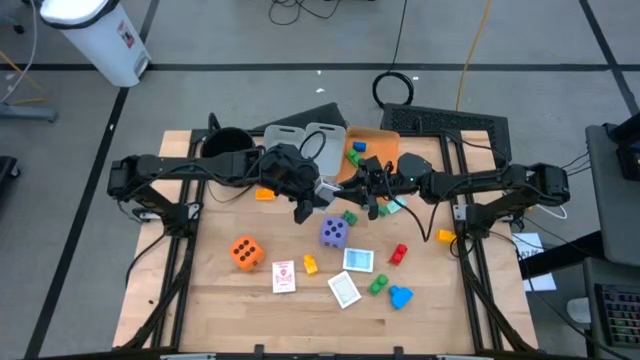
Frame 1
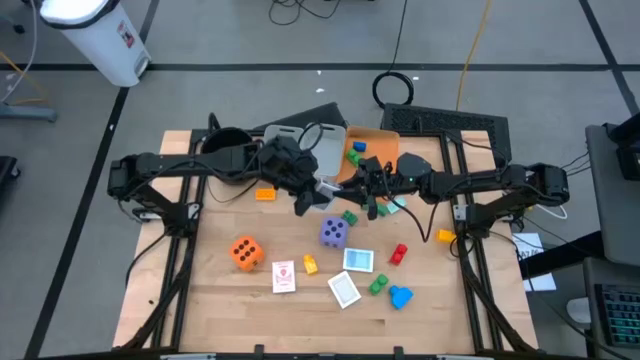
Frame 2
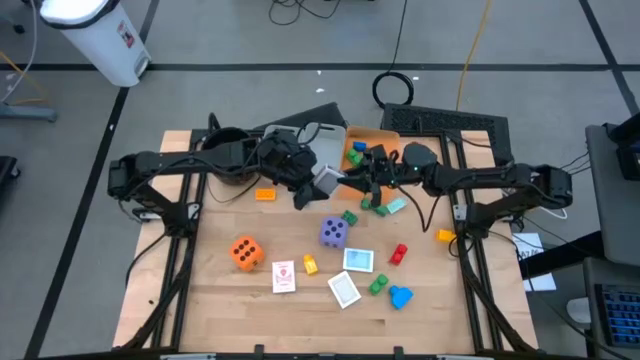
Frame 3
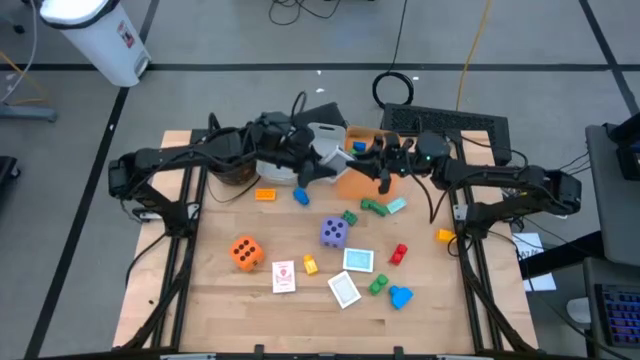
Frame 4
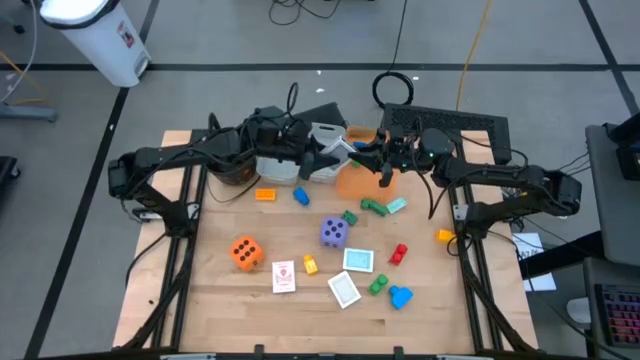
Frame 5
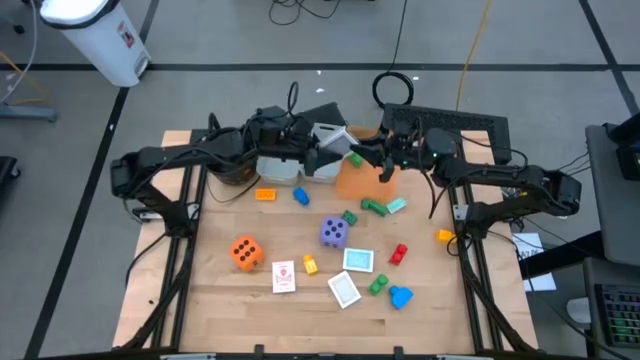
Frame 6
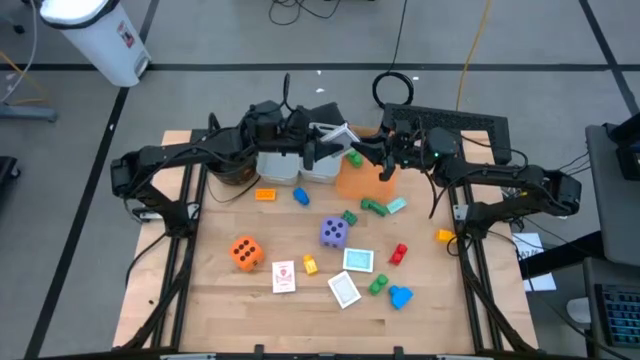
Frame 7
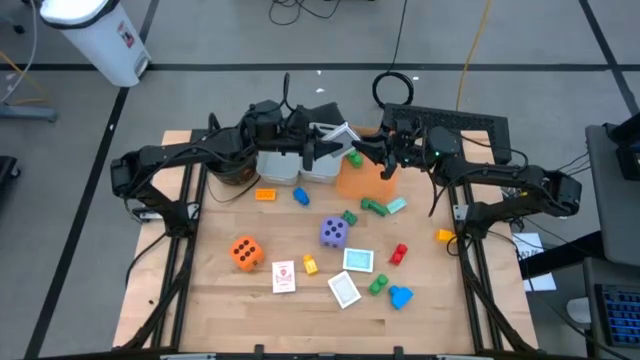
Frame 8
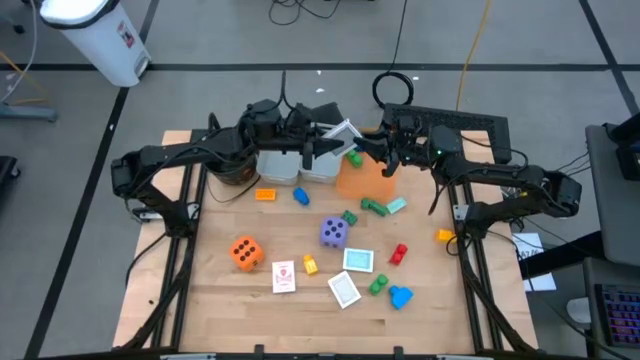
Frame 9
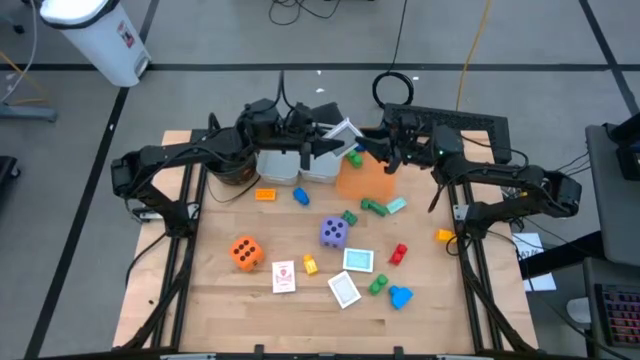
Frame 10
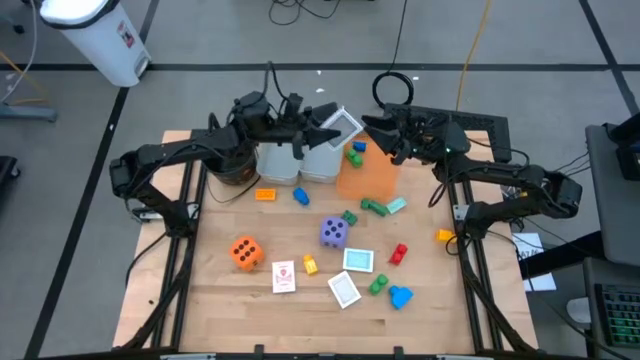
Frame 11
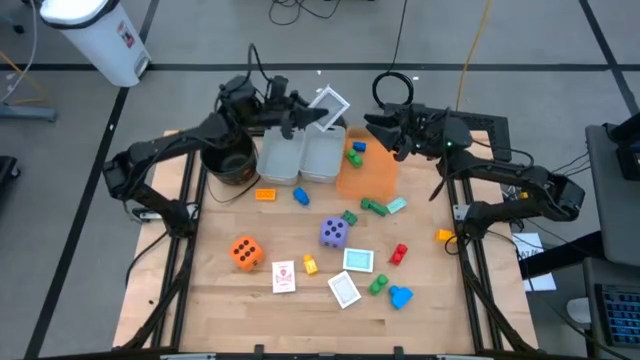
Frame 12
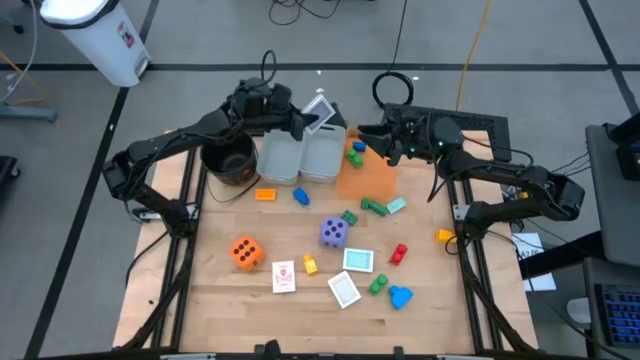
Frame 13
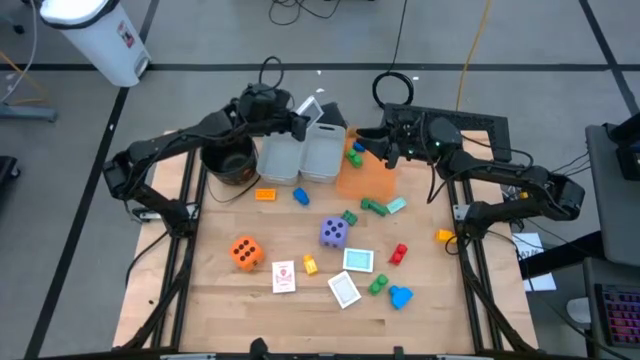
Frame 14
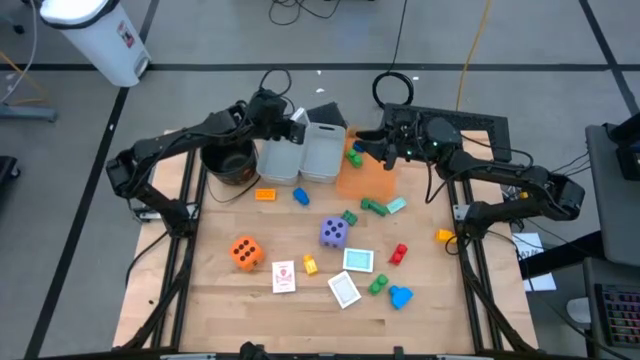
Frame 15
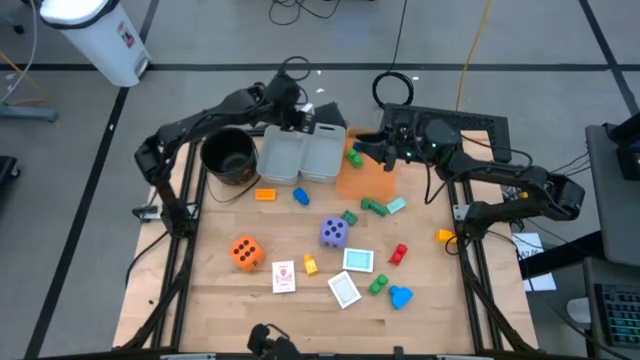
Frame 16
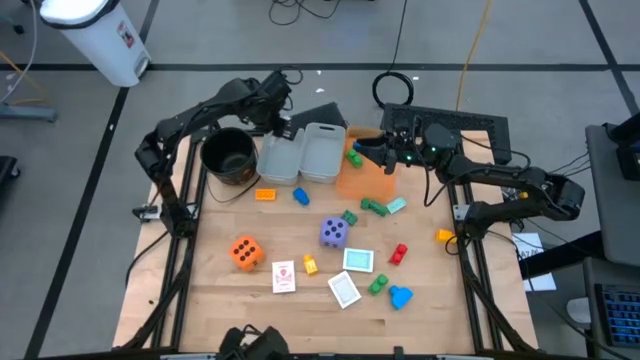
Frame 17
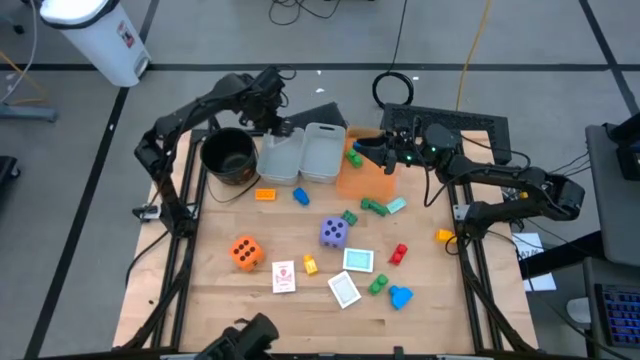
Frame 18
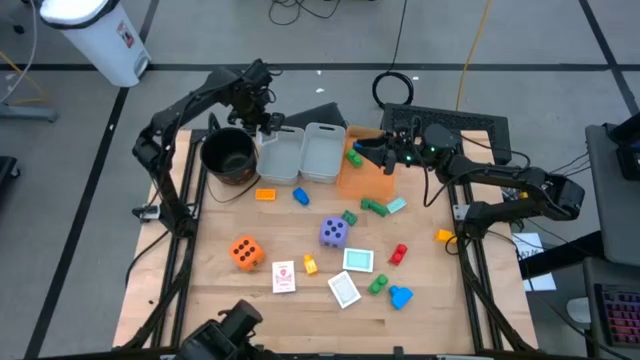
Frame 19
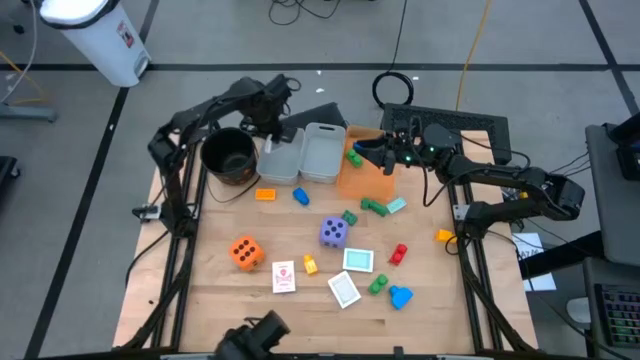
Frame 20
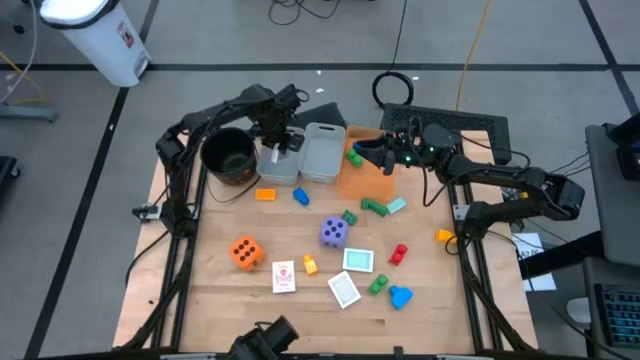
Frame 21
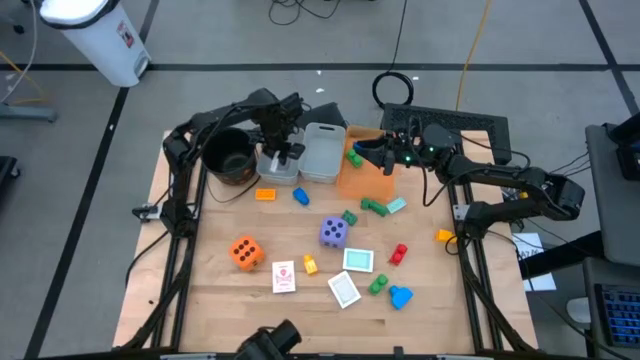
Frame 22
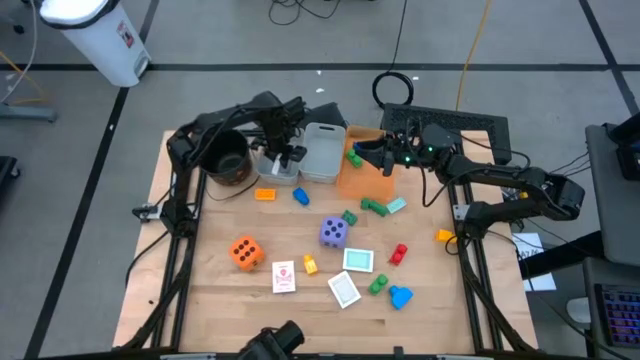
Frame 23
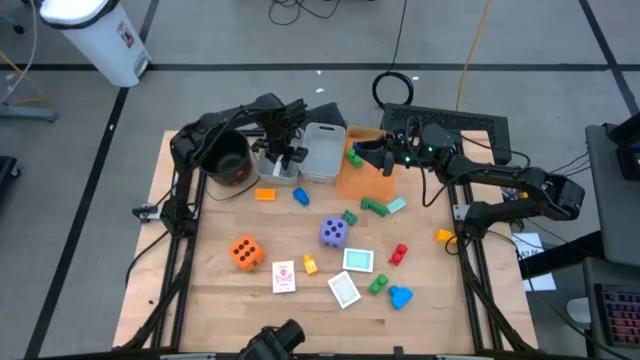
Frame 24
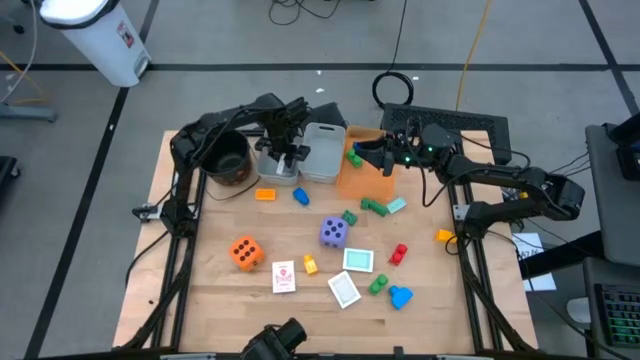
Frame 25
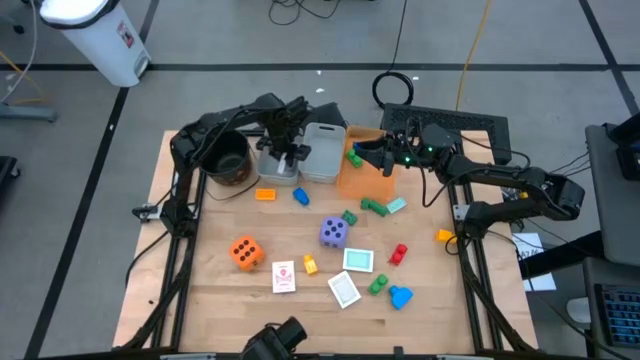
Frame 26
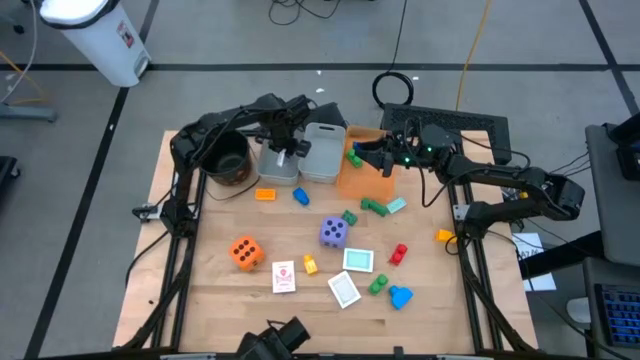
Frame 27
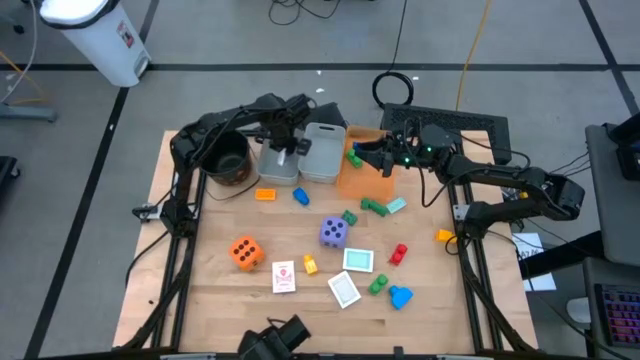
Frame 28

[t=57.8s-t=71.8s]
Task: Pick & Place Toys
Put the black deck of cards into the left gray bin
